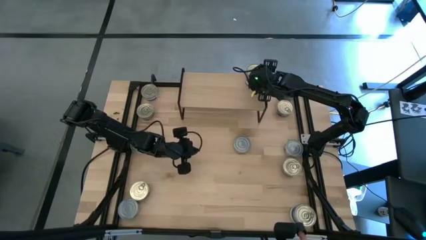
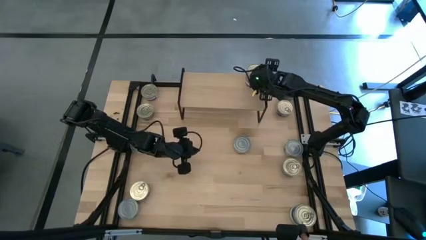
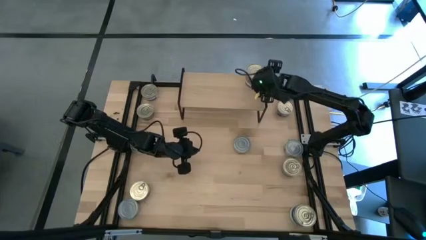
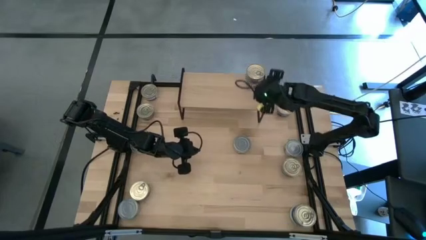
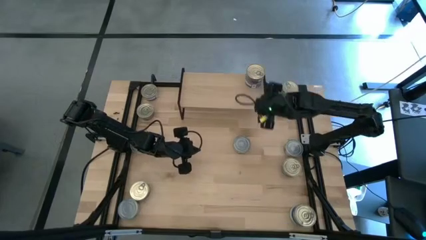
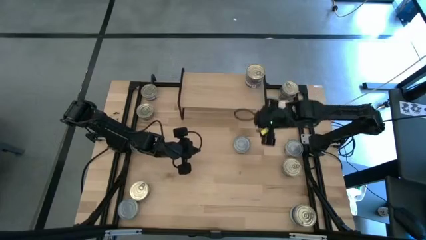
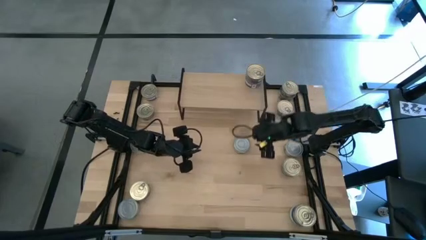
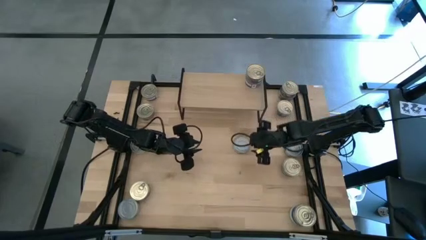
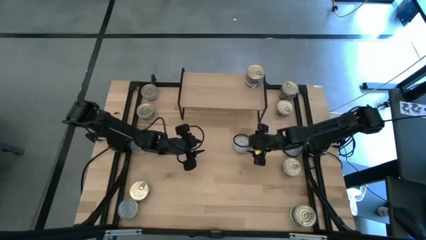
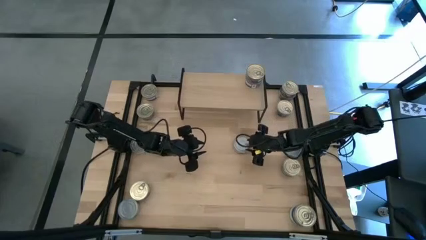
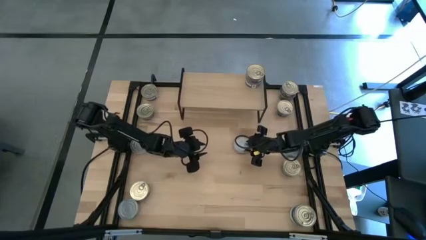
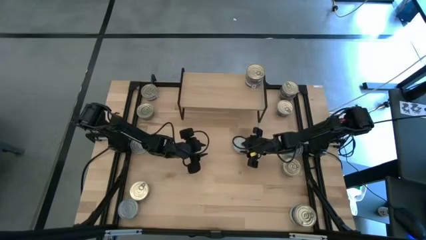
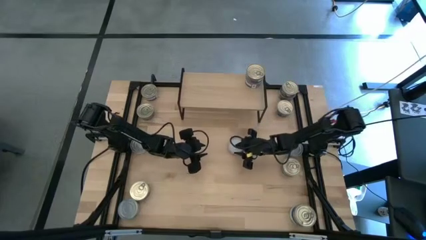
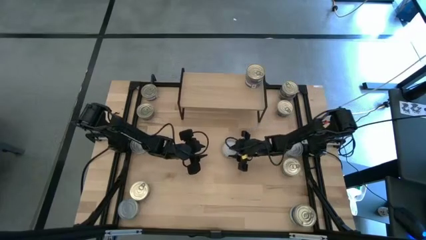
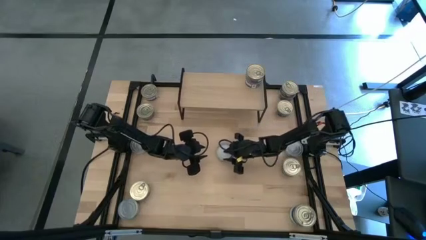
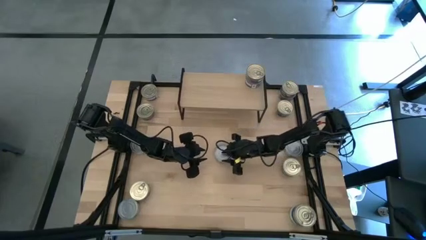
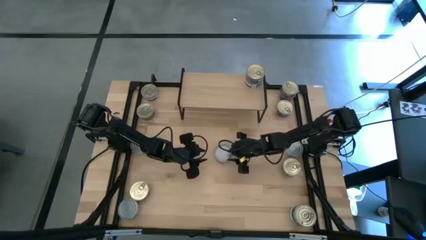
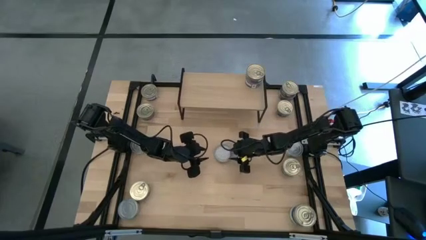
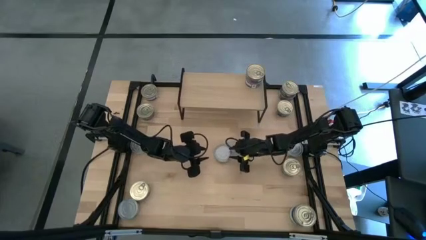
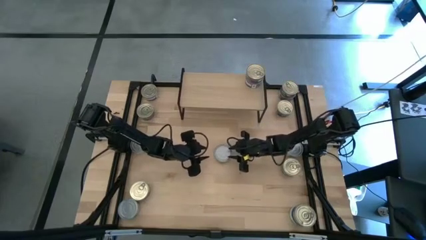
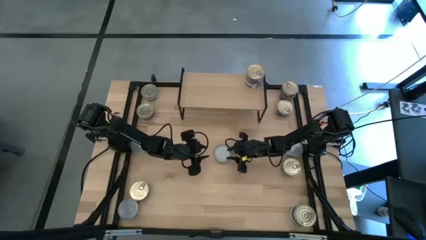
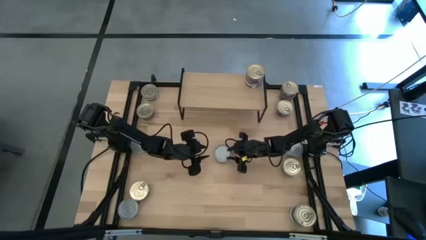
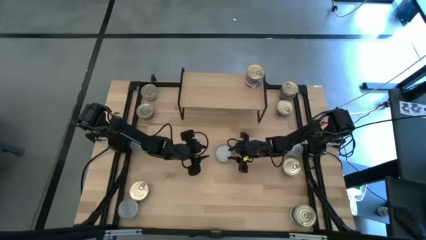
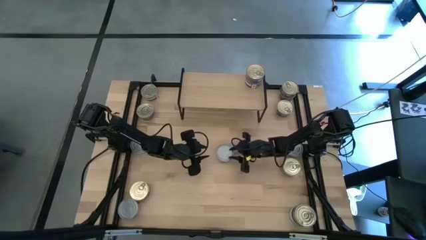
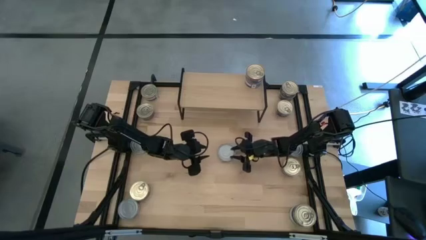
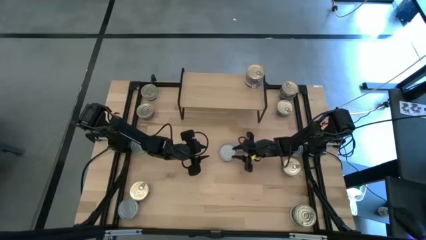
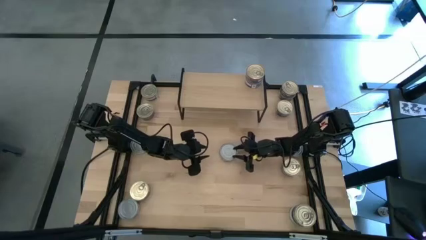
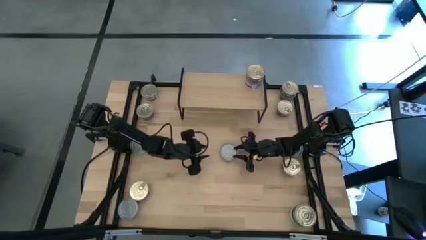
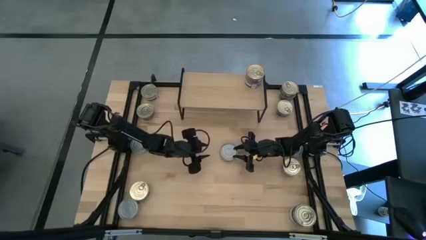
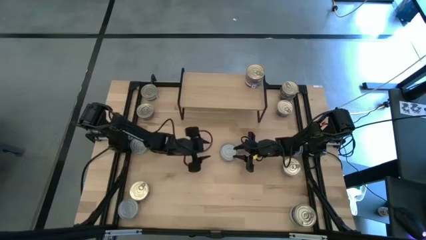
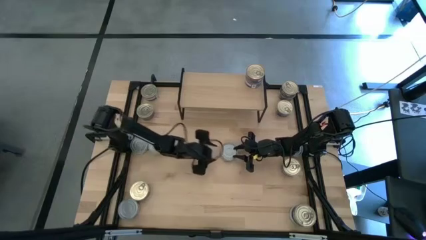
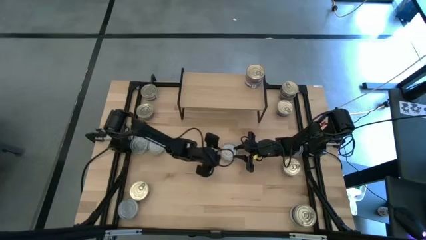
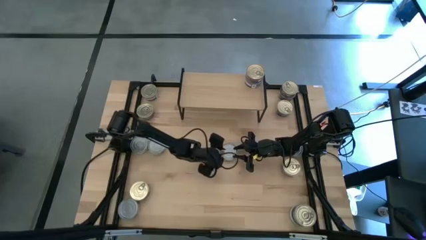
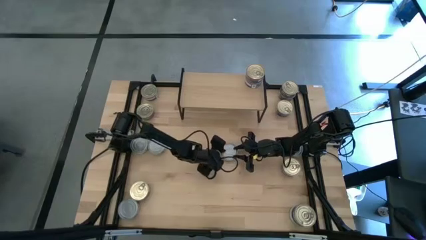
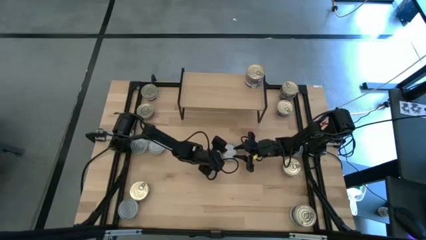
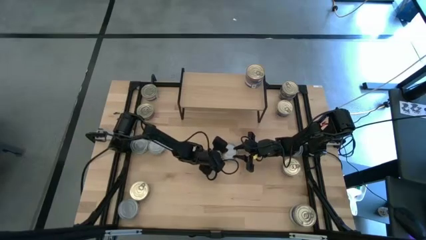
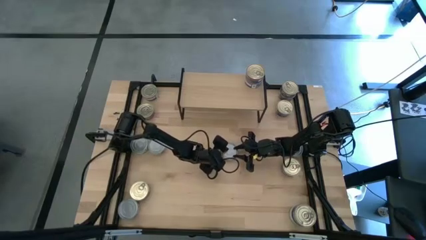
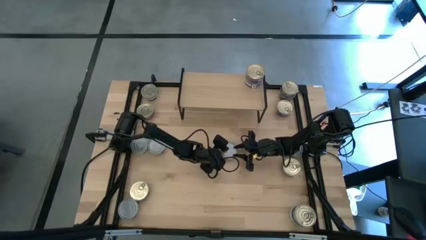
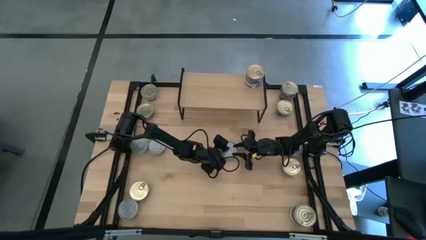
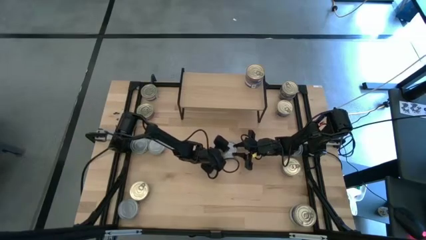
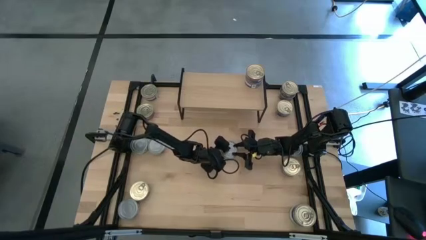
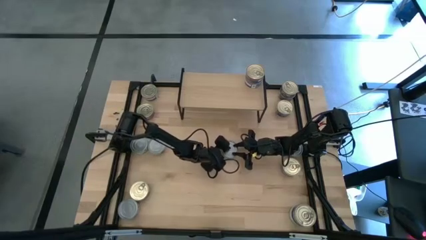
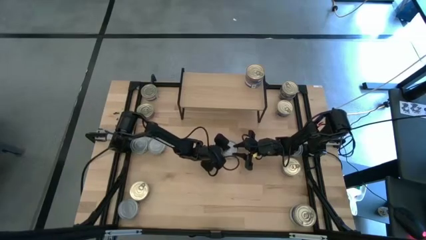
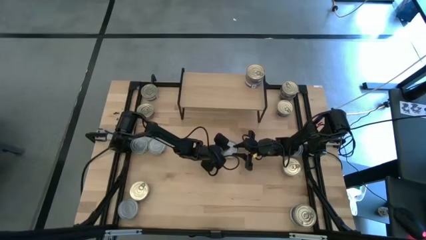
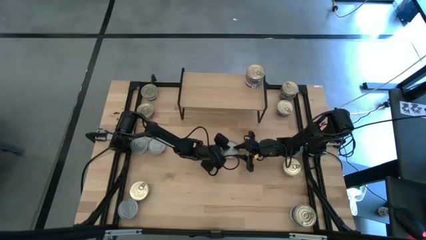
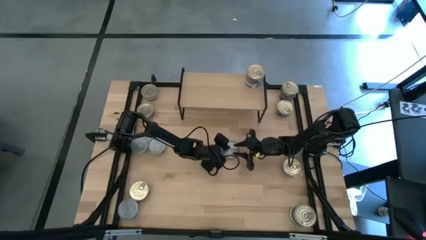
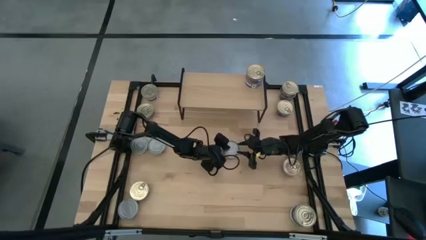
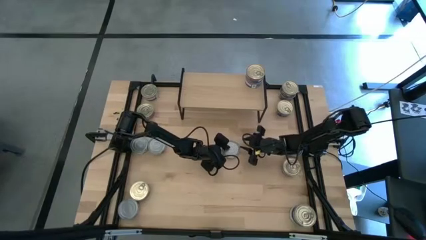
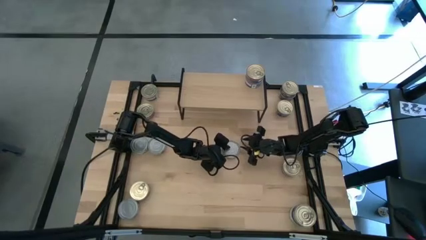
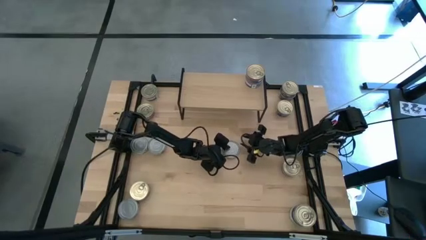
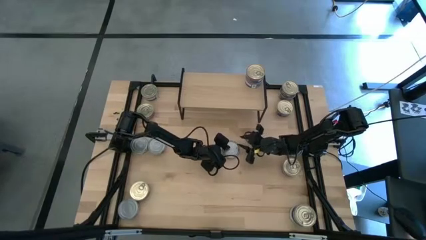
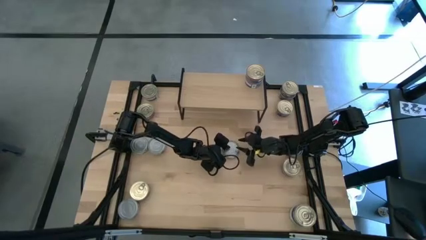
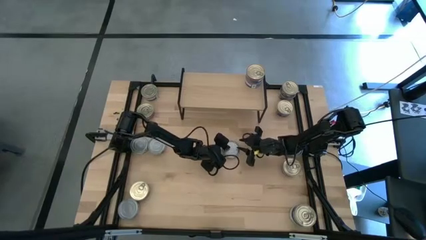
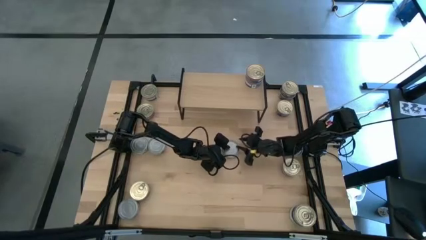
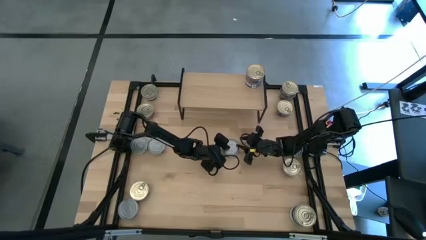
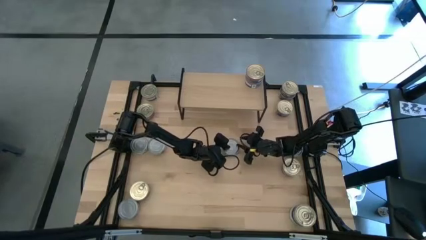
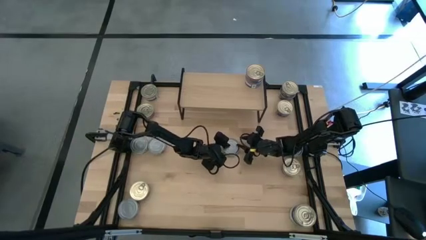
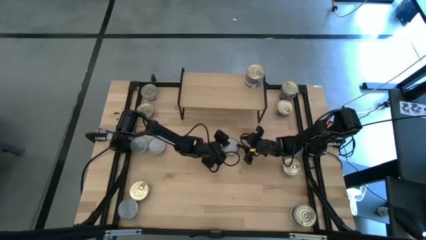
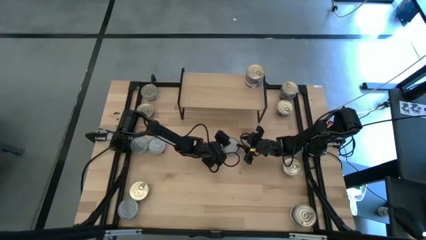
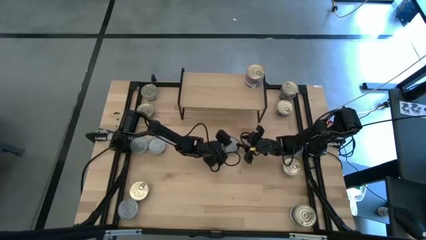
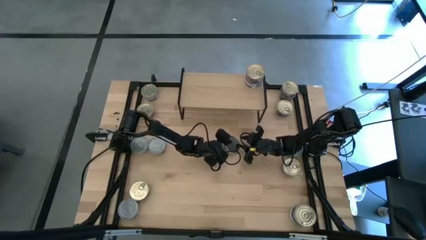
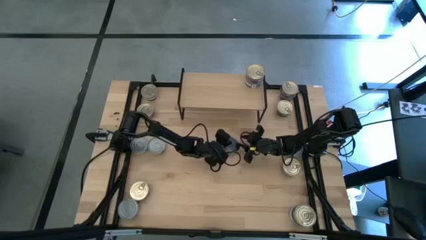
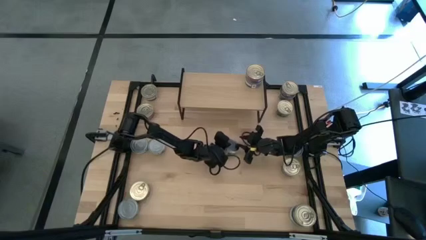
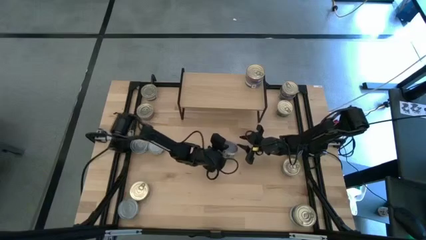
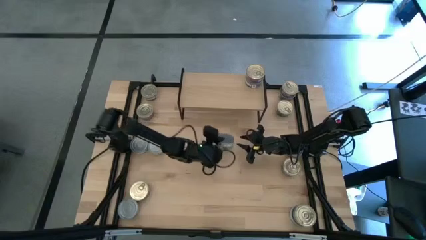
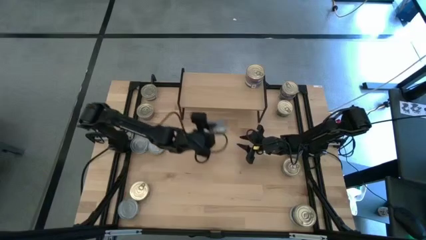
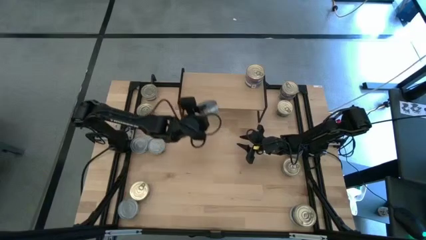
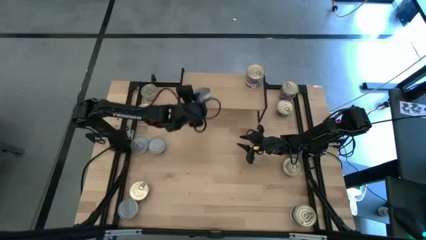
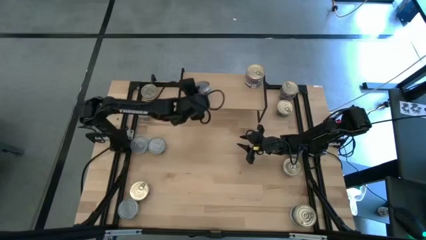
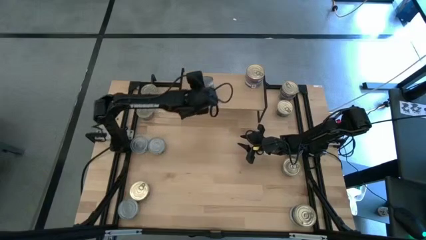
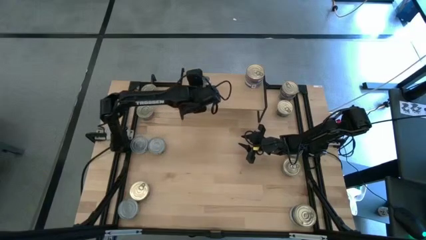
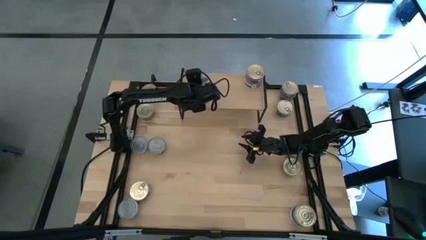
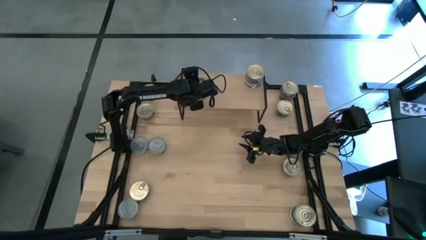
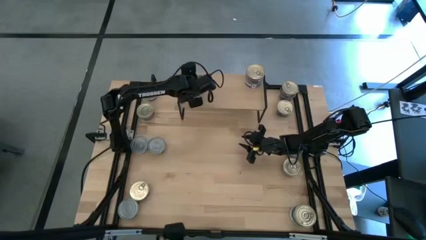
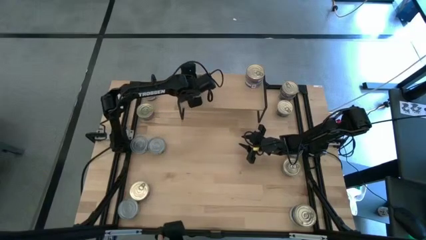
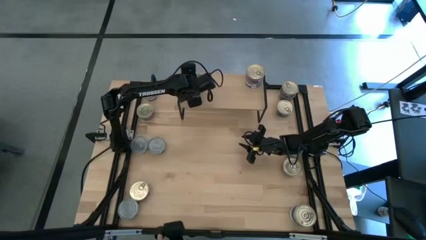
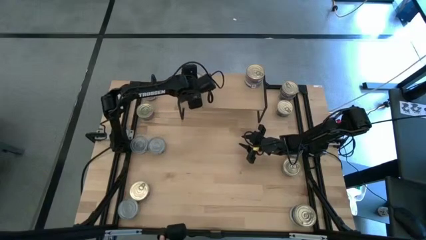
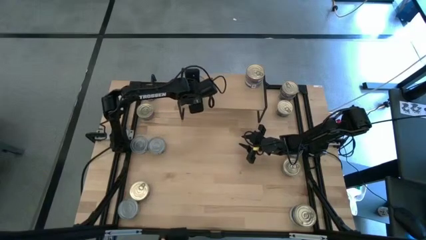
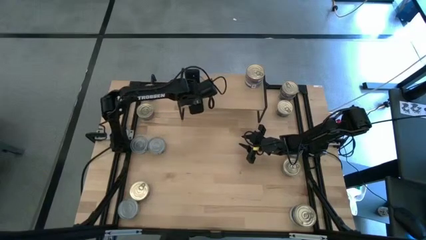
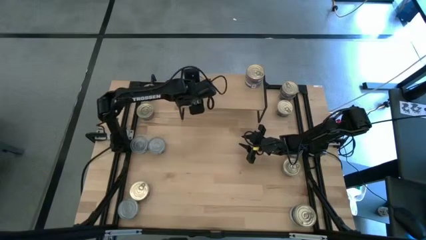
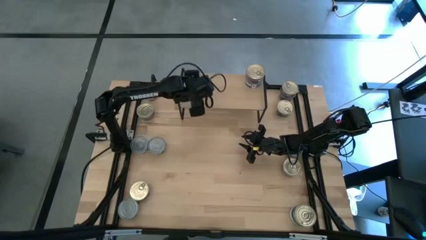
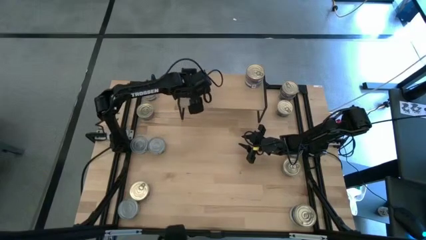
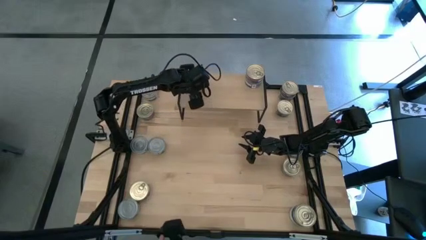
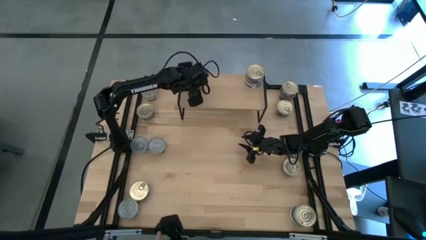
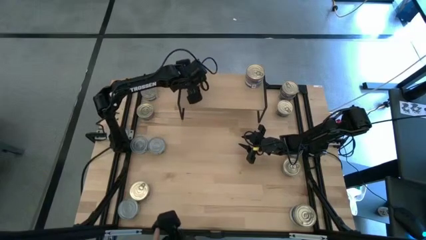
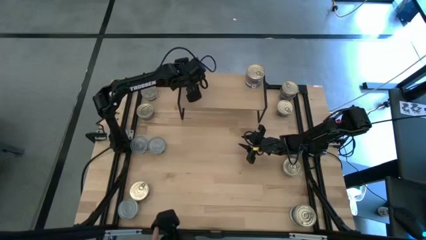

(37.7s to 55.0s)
Task: Stack canned seafood by type on shelf
Put the green white tuna can on the shelf
